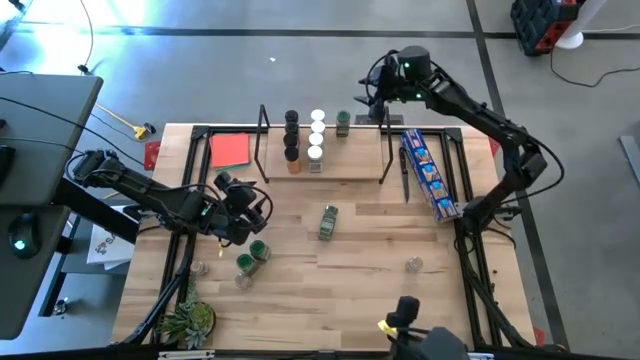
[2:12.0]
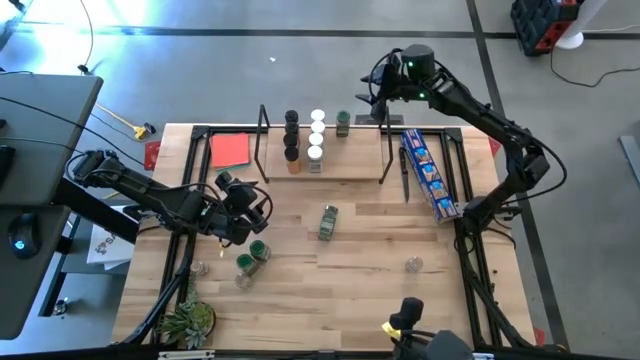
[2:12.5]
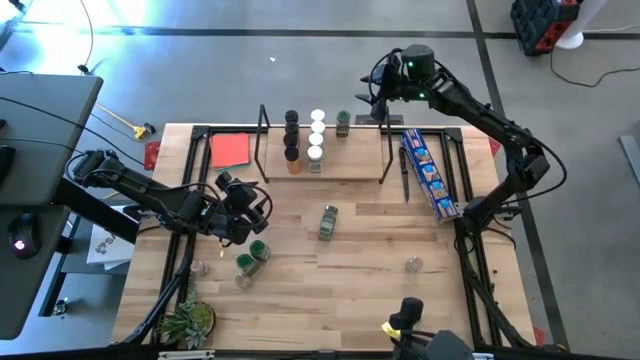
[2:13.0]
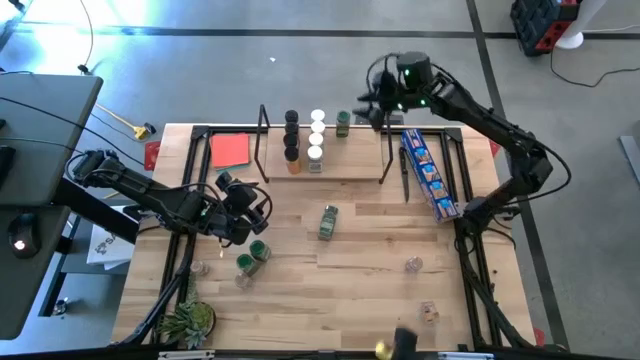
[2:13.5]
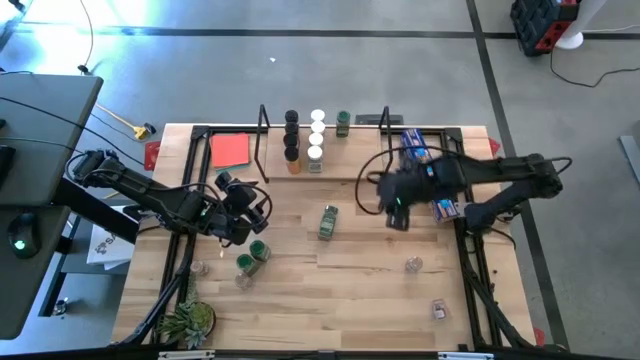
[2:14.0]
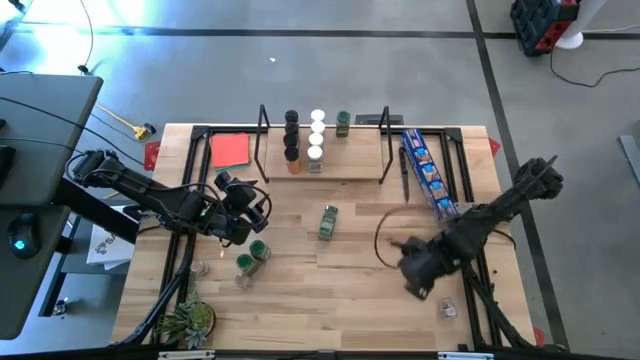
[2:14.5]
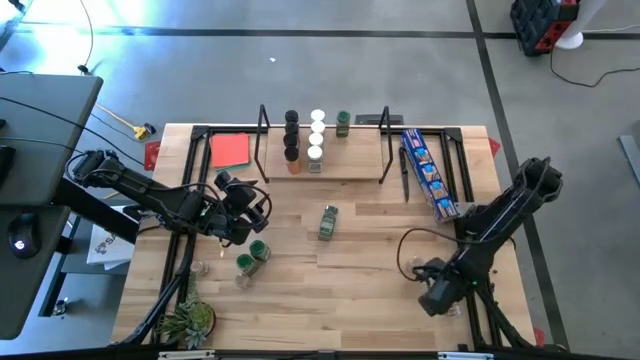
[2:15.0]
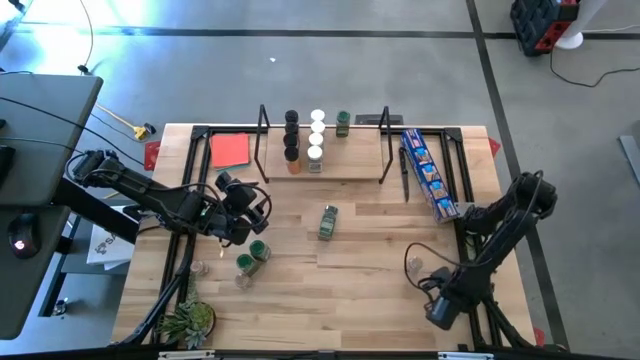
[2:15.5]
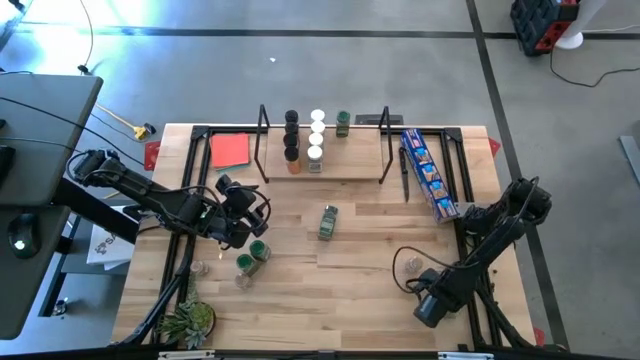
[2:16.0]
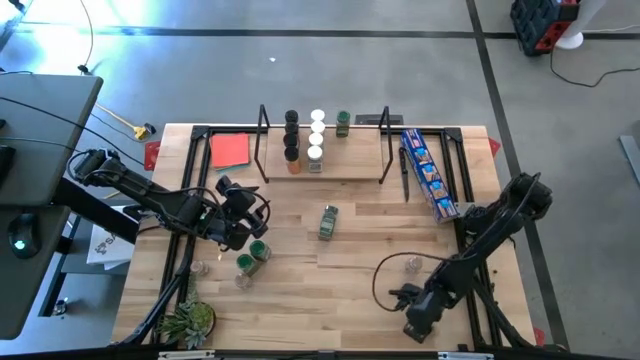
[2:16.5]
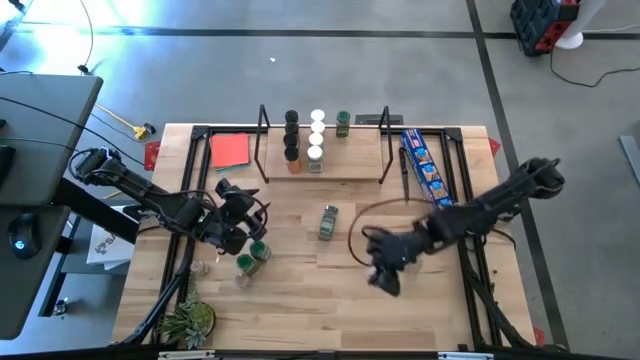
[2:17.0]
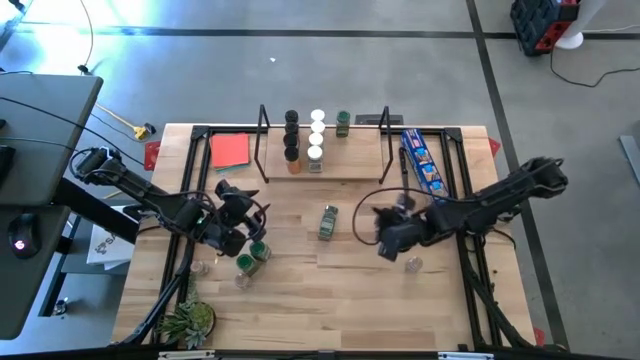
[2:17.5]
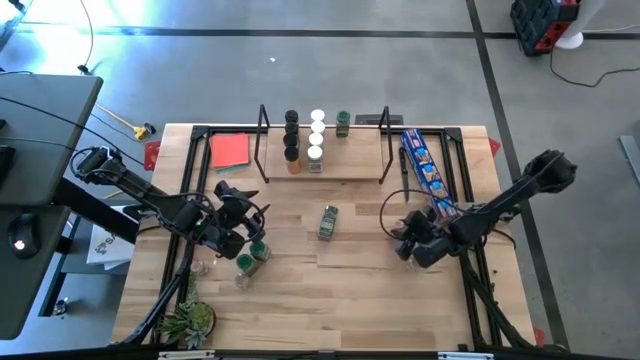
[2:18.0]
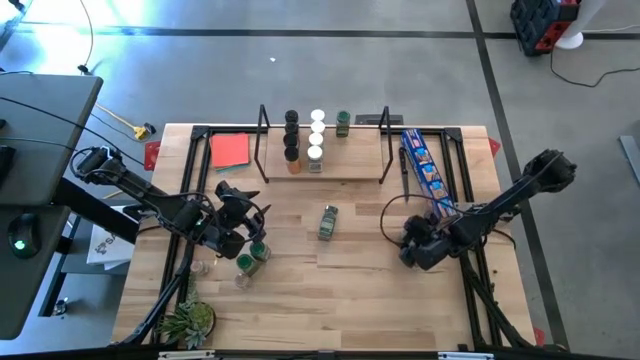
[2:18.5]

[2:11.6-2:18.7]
Task: Shelf spices
Move the brown seasoning bottle to the middle right of the table

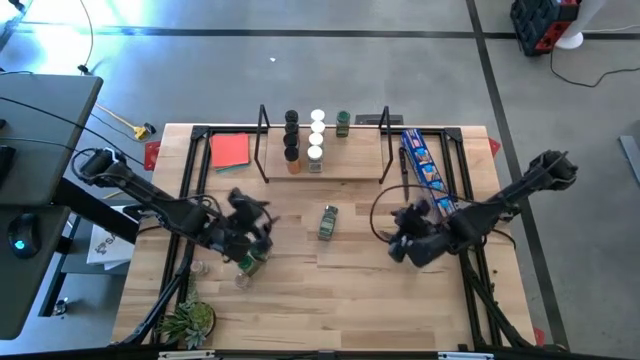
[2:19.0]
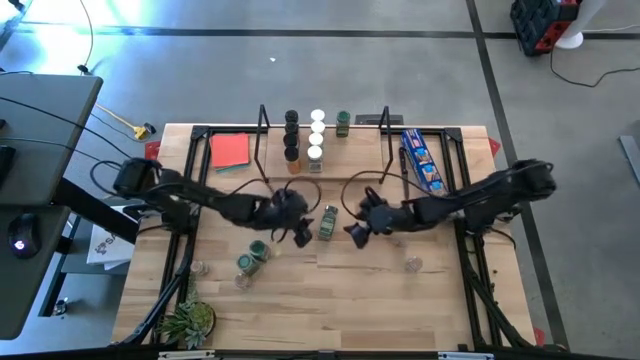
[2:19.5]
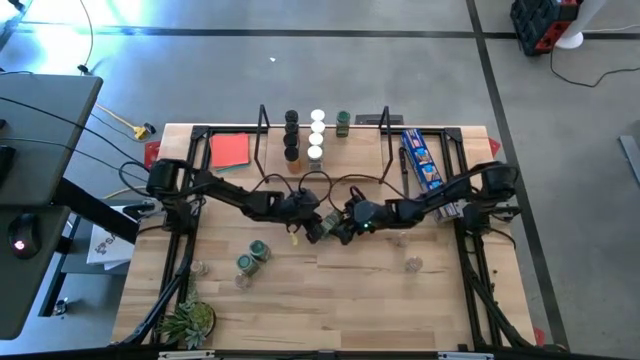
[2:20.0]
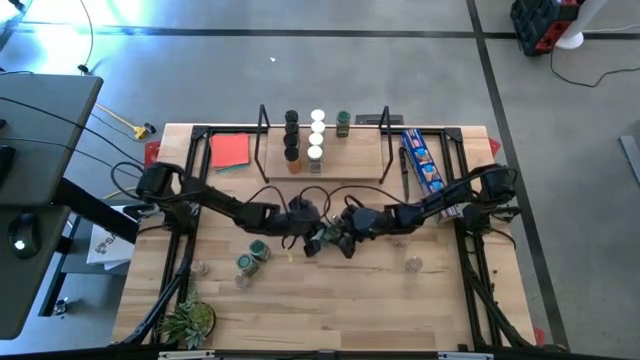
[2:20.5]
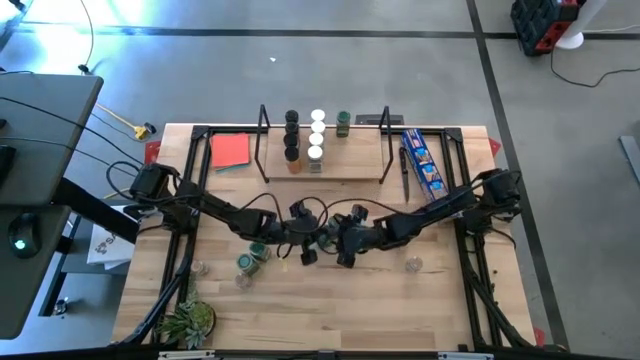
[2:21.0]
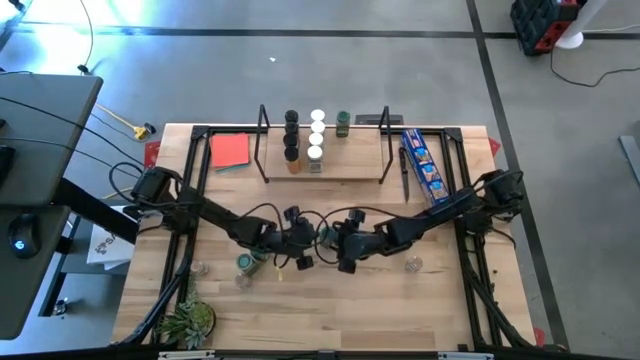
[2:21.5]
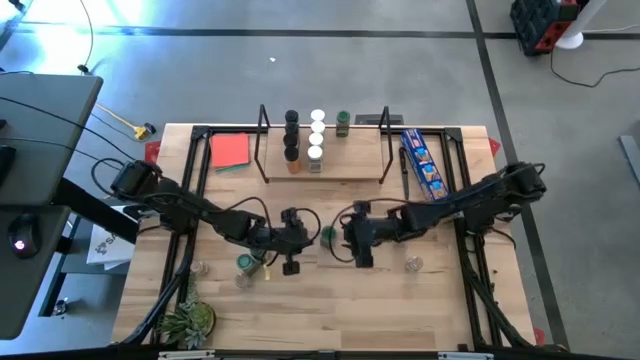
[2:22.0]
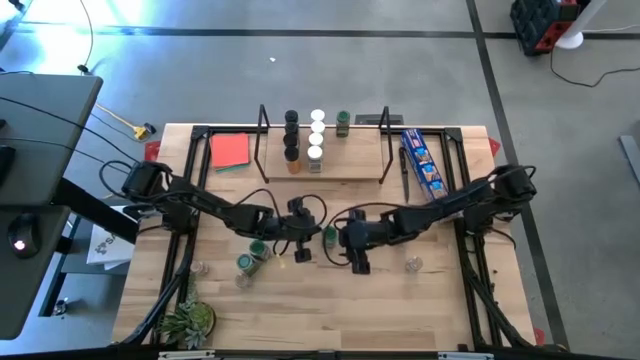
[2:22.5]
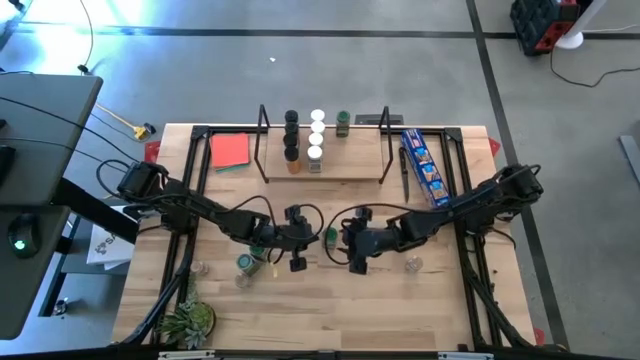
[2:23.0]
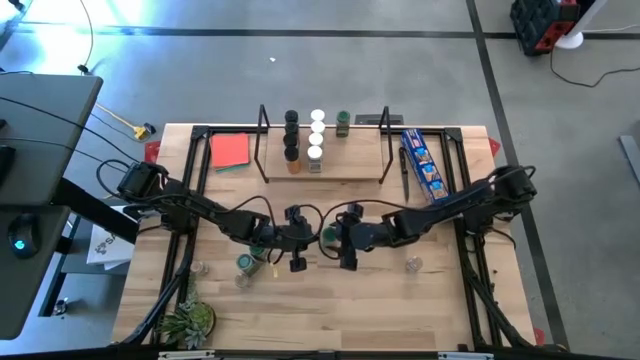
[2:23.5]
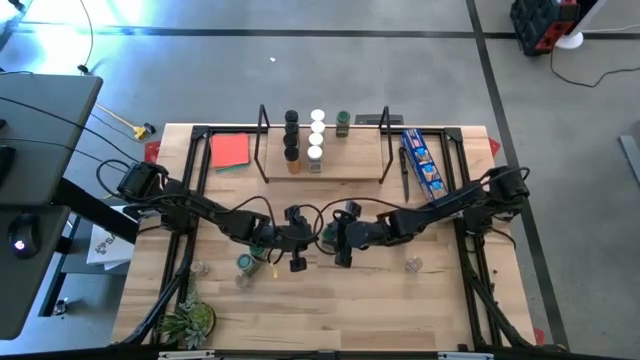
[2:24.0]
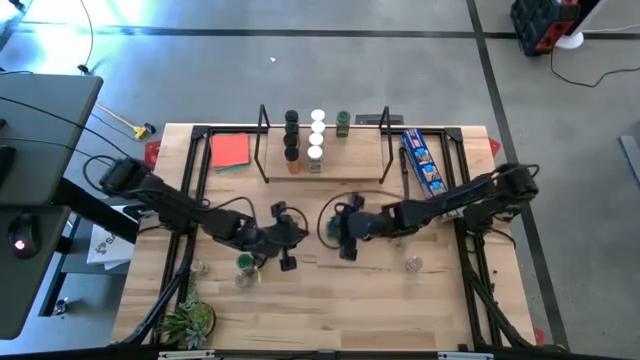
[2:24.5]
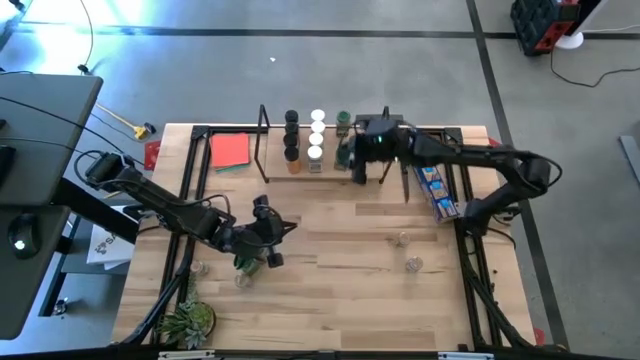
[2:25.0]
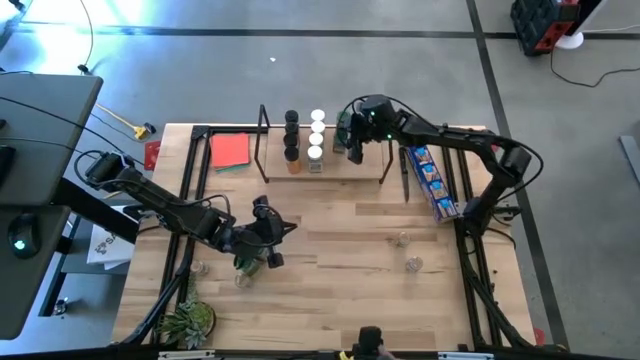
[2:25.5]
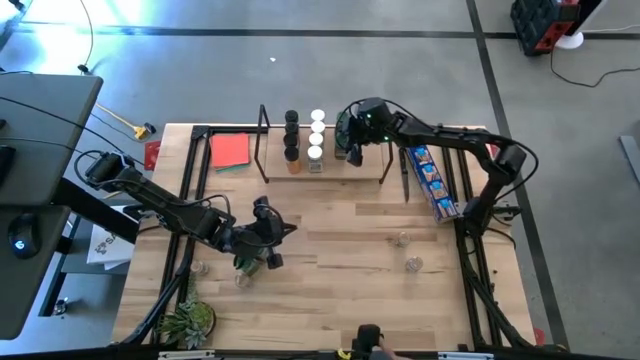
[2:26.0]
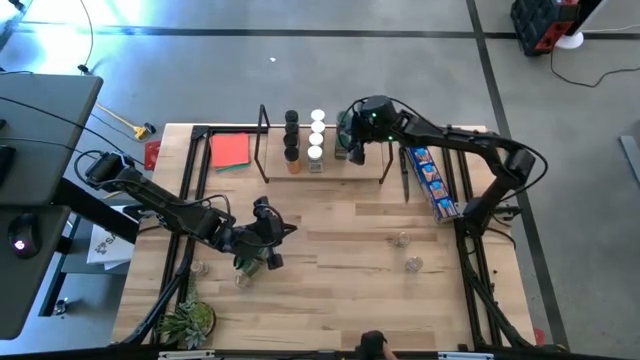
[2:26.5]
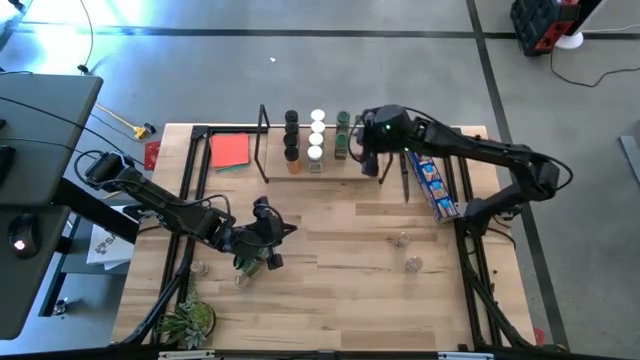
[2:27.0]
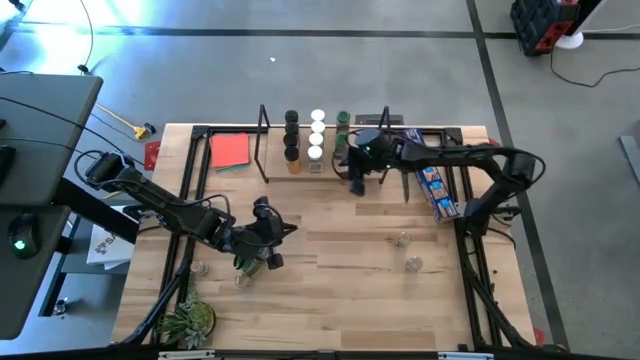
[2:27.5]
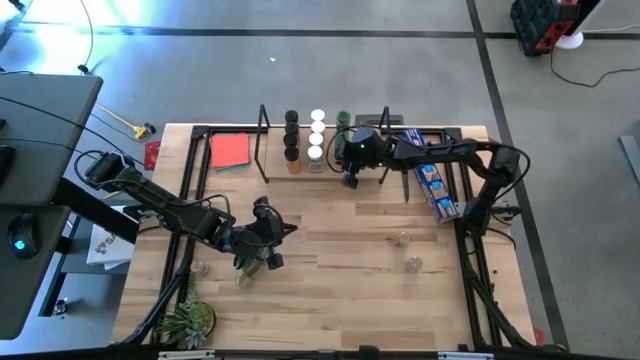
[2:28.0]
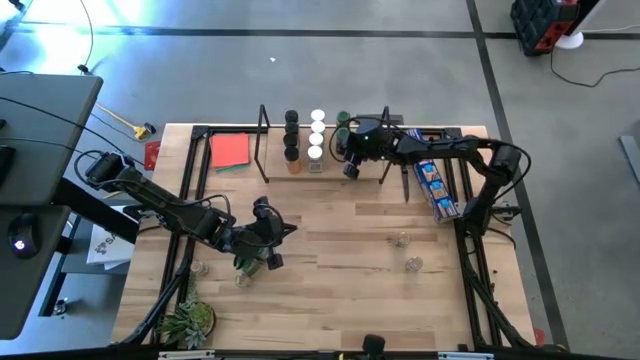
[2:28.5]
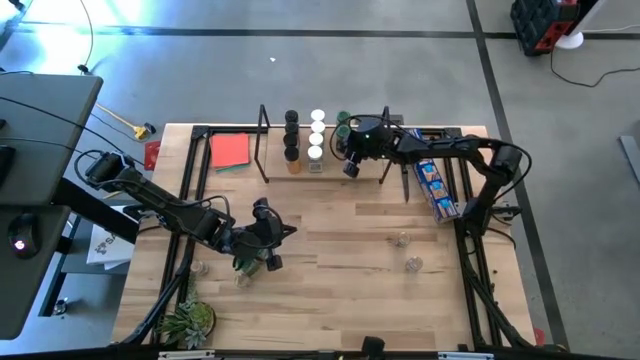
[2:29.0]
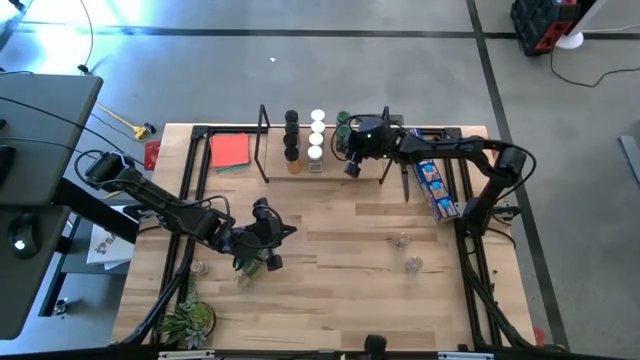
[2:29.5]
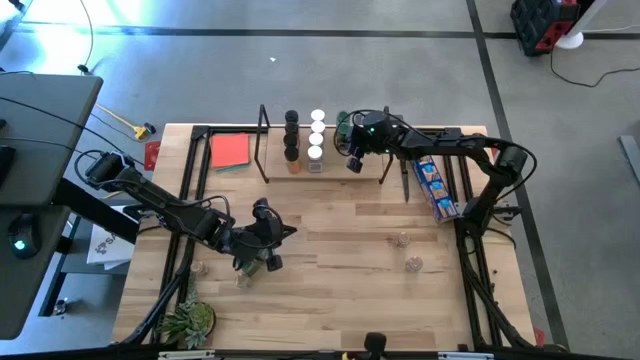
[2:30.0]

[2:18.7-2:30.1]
Put the green seasoning bottle on the shelf aligned with the other green seasoning bottles

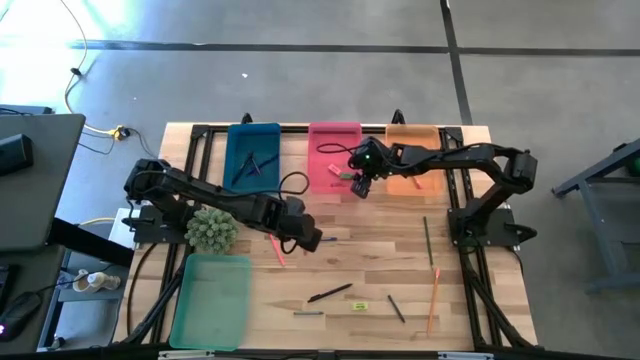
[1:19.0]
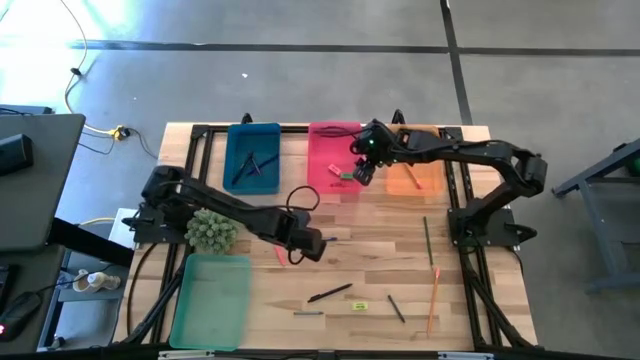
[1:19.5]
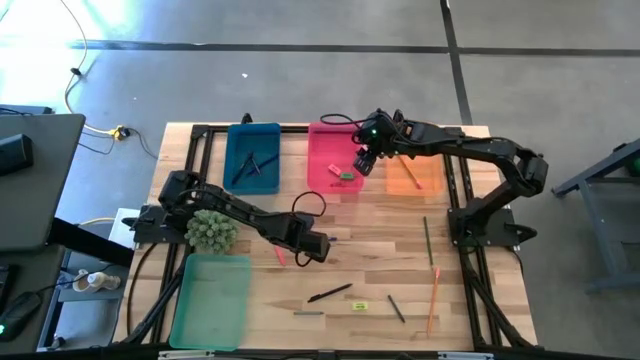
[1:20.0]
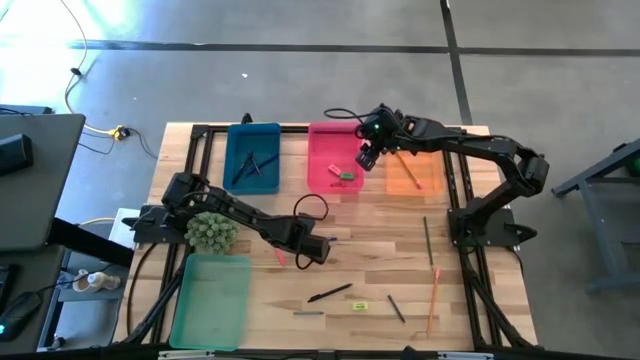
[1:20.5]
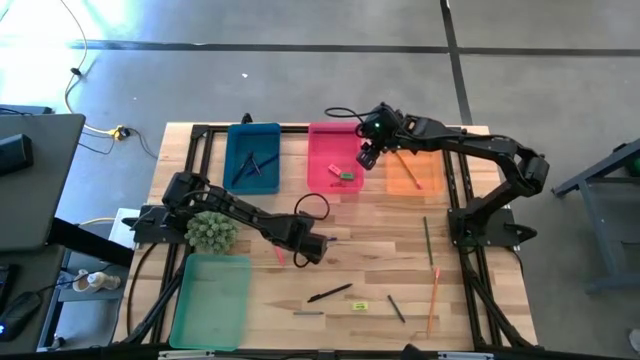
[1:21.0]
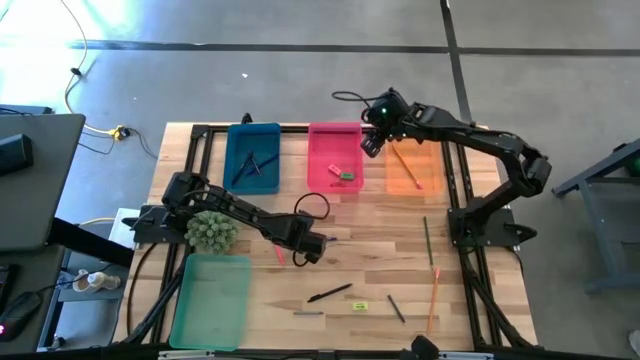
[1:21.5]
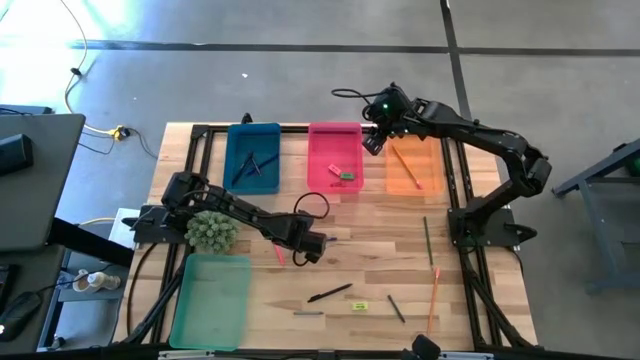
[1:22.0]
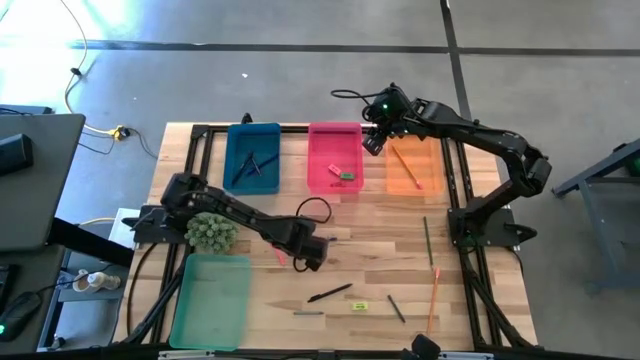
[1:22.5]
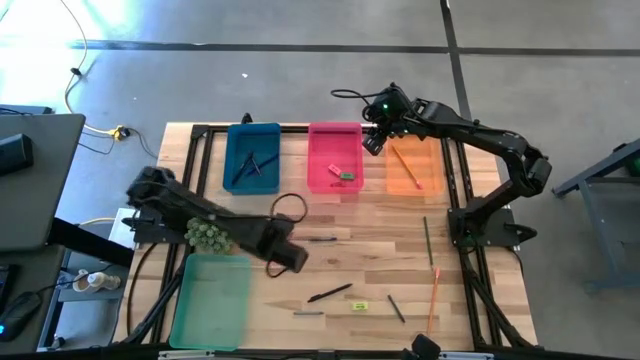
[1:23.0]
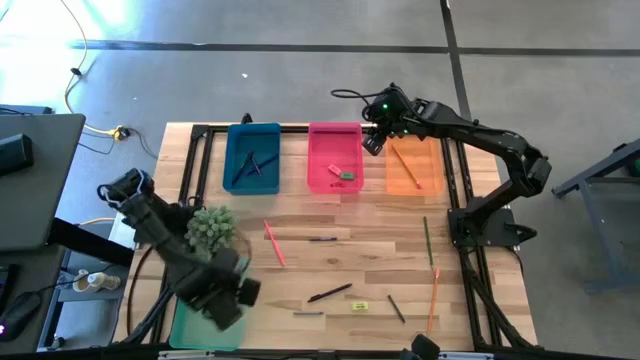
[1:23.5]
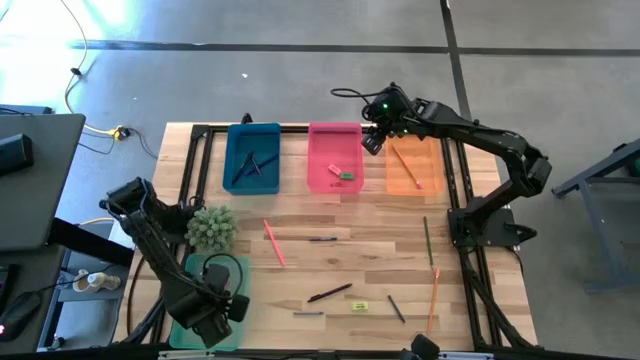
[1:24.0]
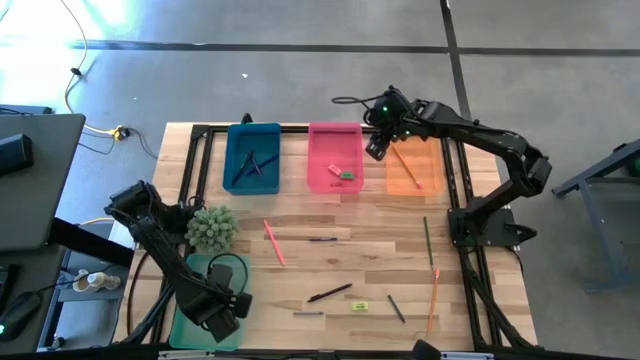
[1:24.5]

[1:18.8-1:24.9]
Task: Sort crayons/erasers/pens/pencils in bins
Put the red crayon into the green bin
